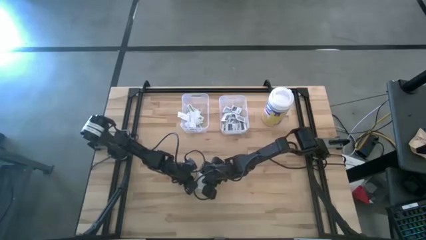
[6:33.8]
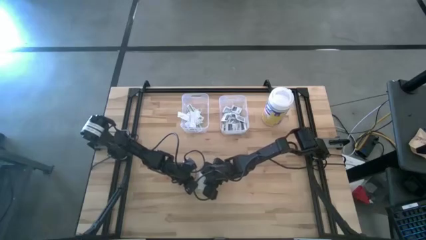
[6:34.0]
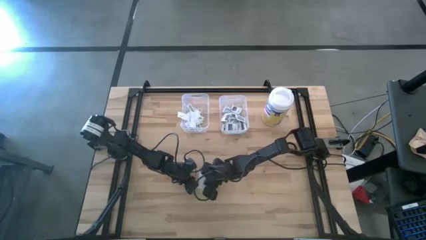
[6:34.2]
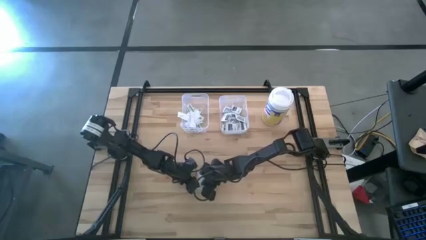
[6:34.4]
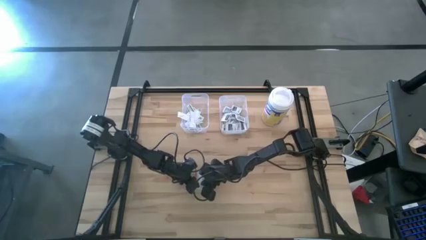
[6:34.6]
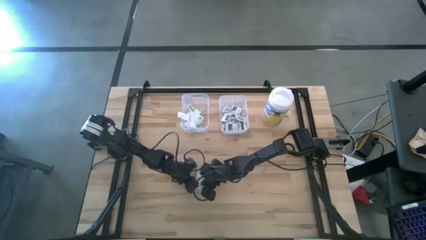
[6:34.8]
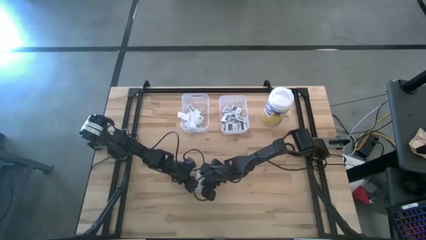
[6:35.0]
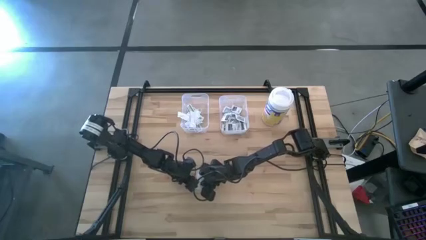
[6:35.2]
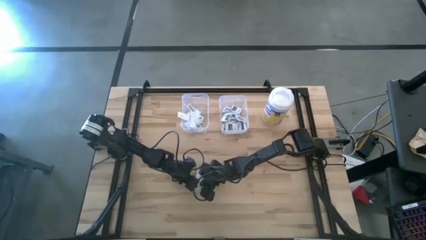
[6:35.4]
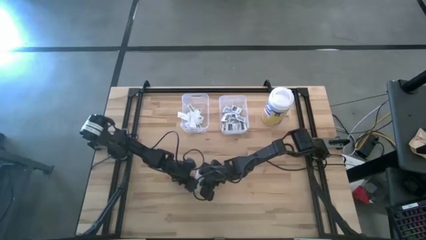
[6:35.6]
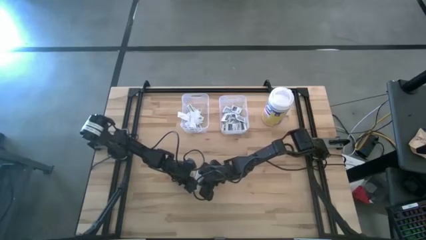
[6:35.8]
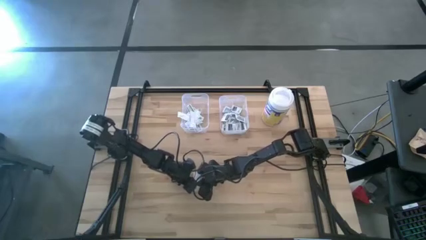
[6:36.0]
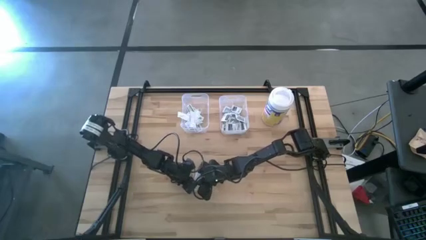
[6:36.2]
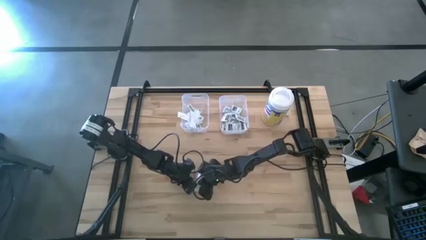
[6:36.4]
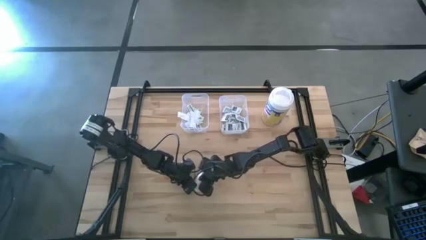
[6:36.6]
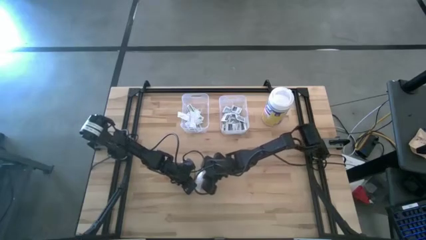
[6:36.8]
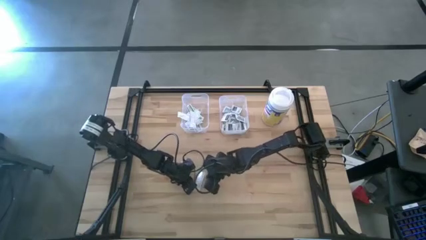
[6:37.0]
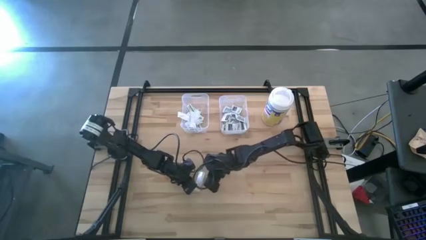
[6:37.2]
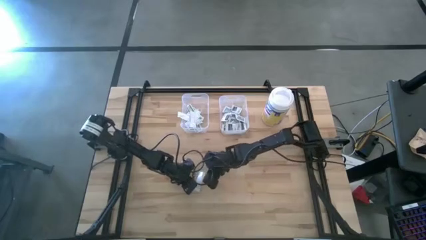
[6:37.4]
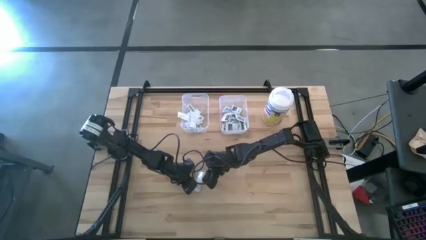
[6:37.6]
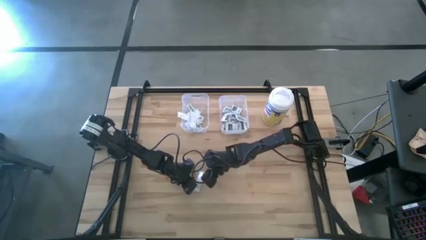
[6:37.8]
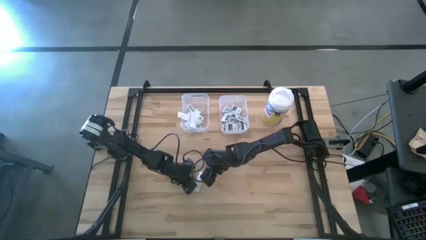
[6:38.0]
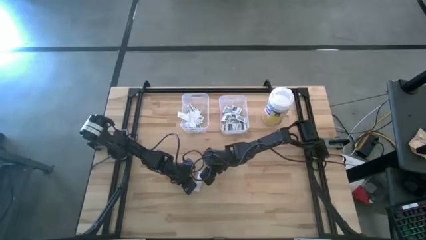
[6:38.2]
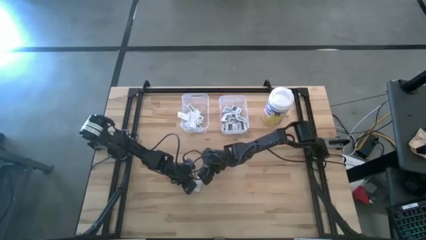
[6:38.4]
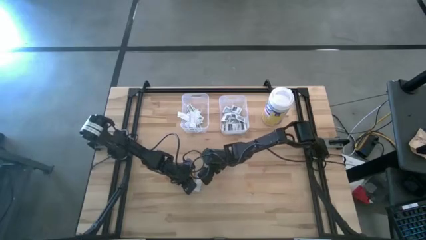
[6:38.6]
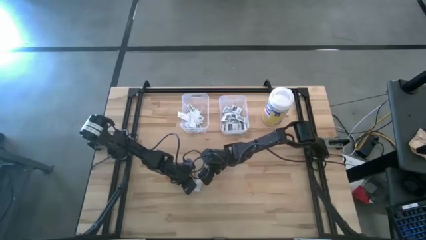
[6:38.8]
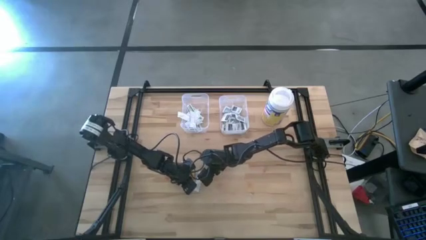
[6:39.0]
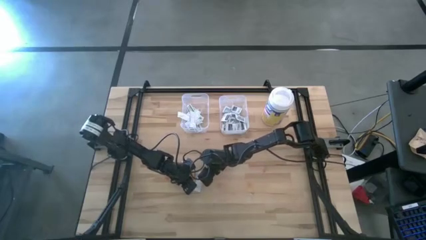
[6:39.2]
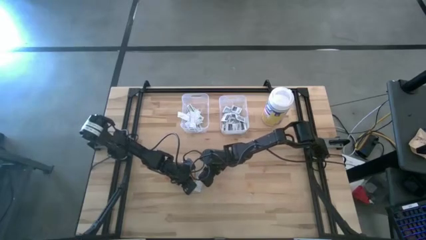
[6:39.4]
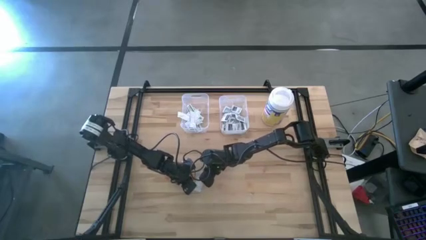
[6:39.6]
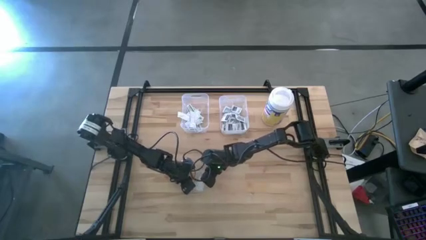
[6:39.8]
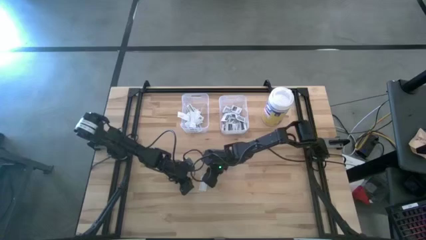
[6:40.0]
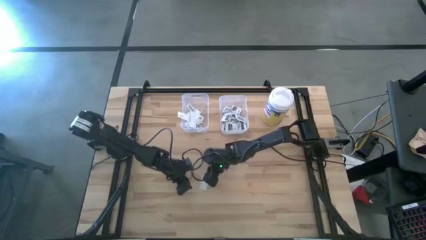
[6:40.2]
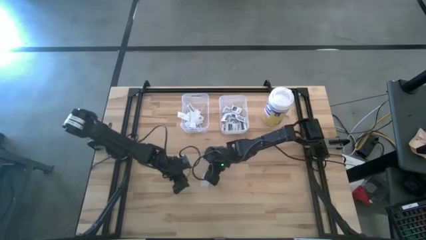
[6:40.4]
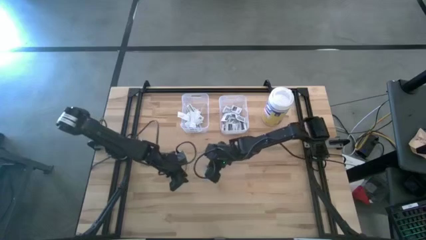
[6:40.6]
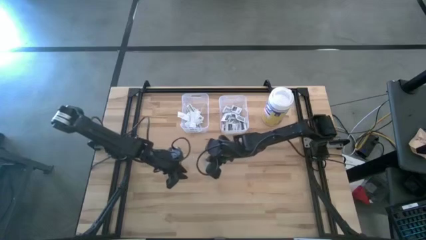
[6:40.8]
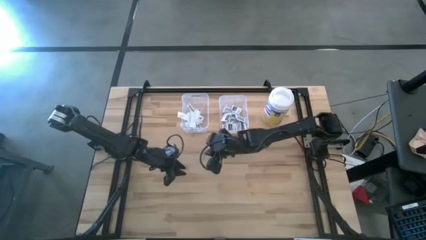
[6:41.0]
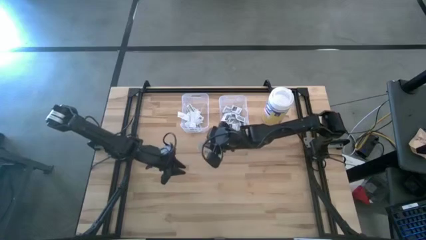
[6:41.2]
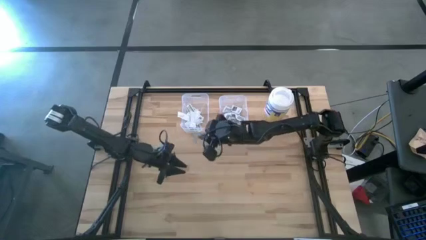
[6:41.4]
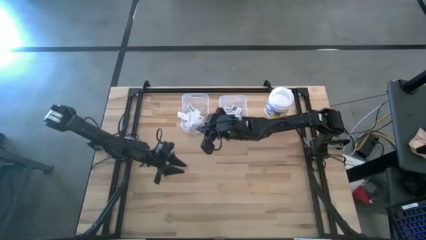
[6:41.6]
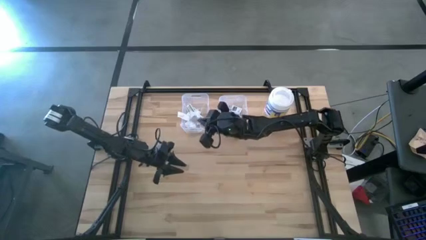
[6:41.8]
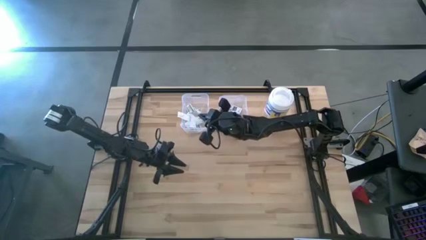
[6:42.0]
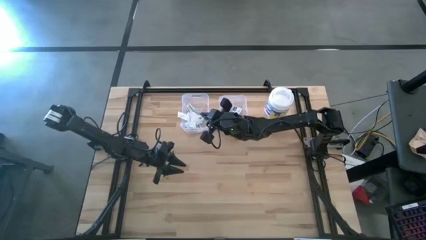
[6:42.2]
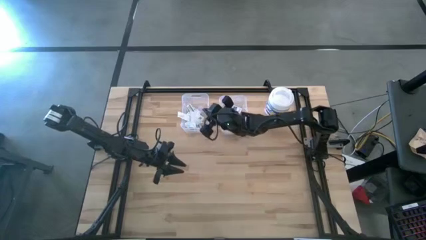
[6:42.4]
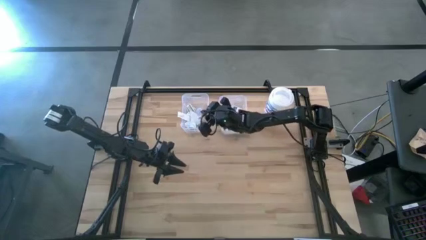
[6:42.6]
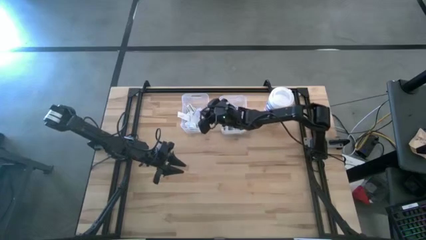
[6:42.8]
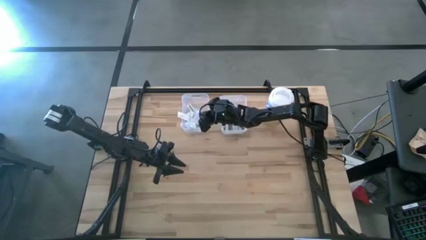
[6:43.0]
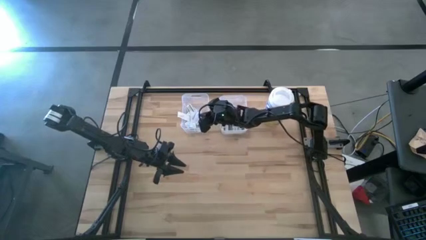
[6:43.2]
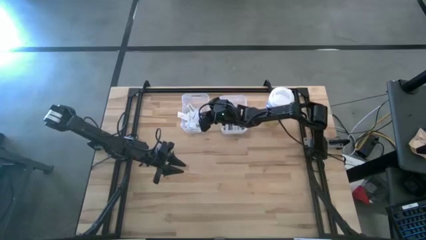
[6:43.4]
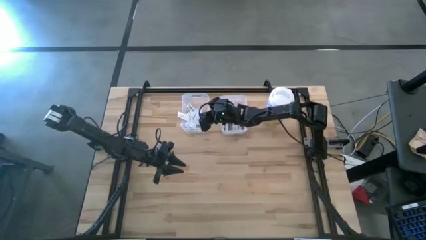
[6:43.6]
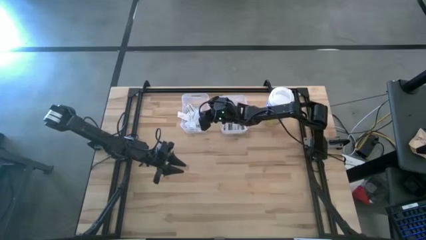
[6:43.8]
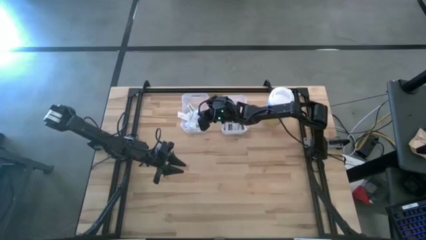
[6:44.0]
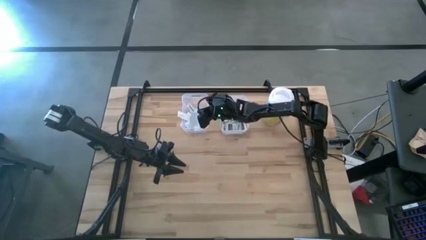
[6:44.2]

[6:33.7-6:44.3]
Task: Pick & Place First Aid Supplies
Put the green bandage pack into the left transparent bin

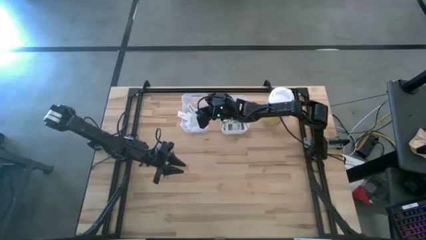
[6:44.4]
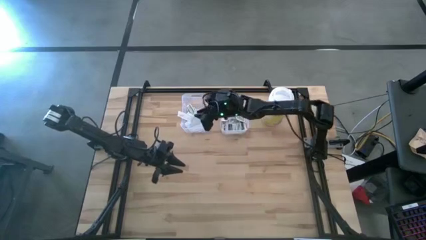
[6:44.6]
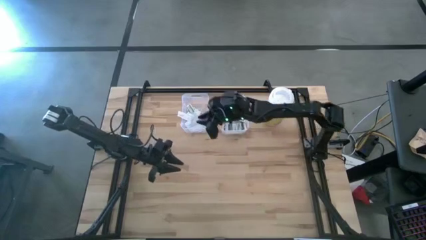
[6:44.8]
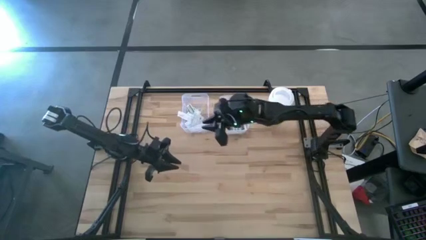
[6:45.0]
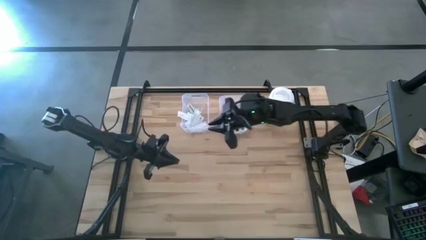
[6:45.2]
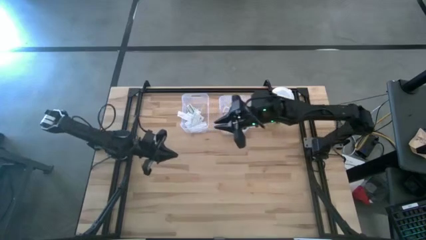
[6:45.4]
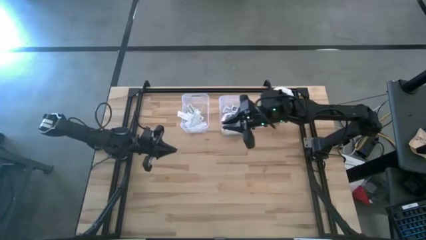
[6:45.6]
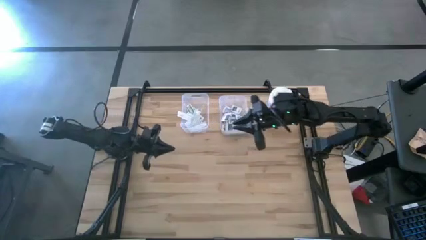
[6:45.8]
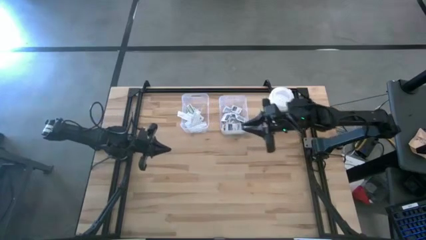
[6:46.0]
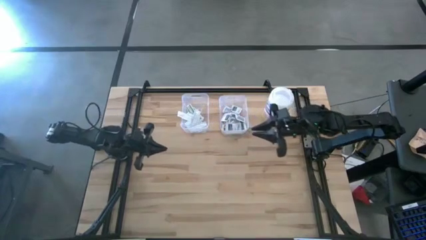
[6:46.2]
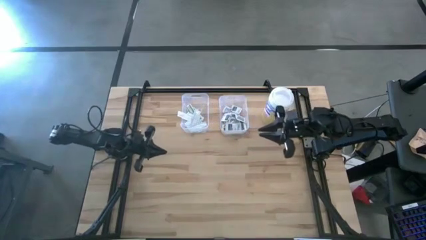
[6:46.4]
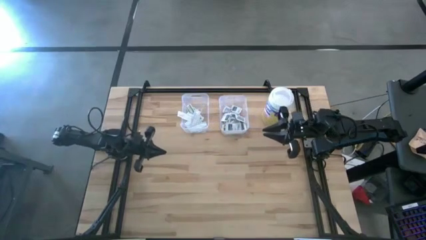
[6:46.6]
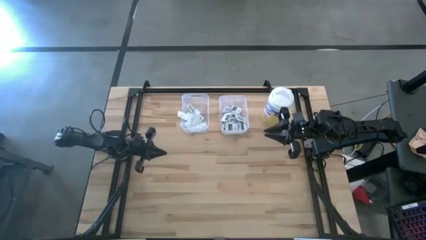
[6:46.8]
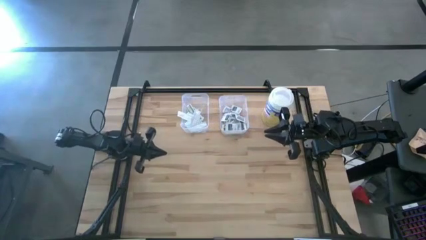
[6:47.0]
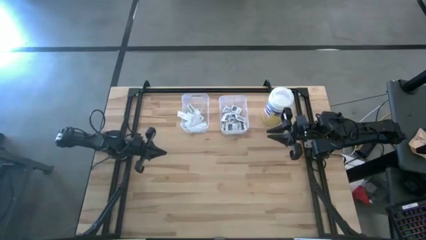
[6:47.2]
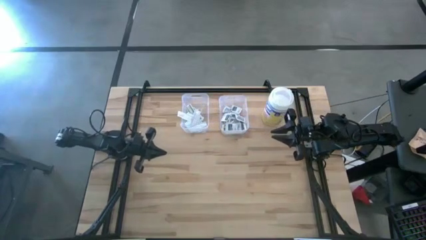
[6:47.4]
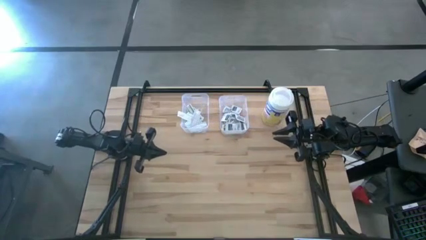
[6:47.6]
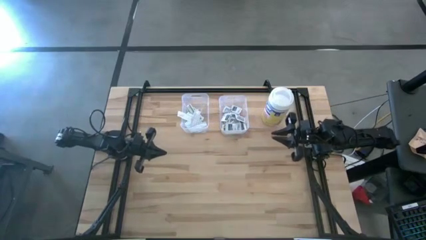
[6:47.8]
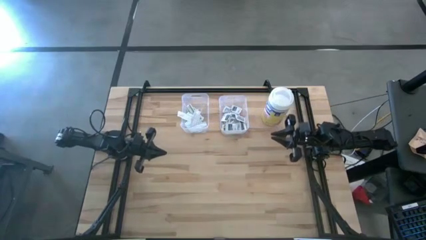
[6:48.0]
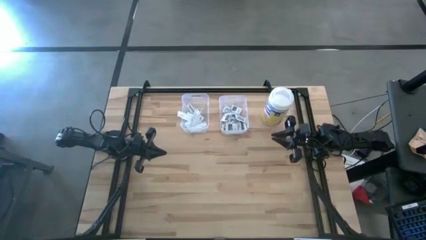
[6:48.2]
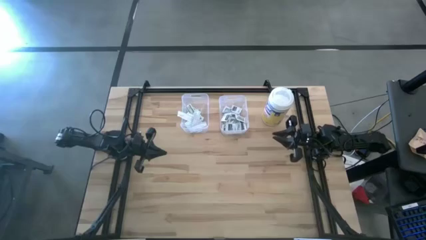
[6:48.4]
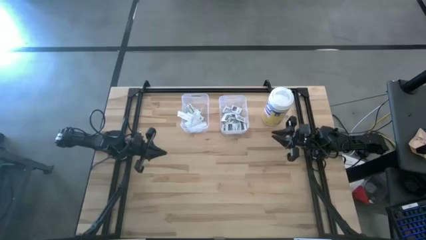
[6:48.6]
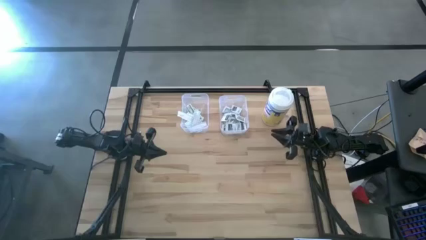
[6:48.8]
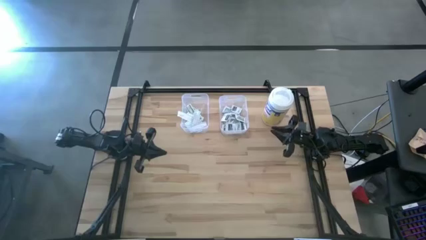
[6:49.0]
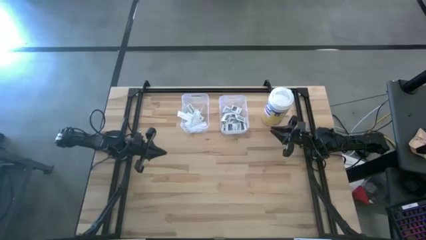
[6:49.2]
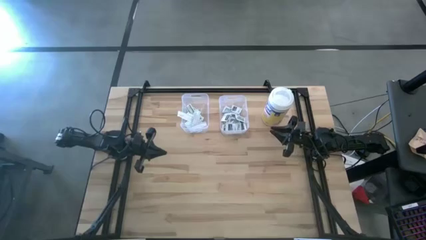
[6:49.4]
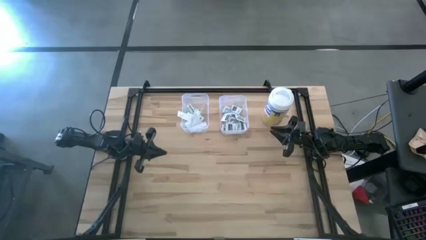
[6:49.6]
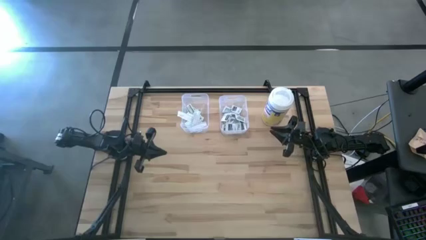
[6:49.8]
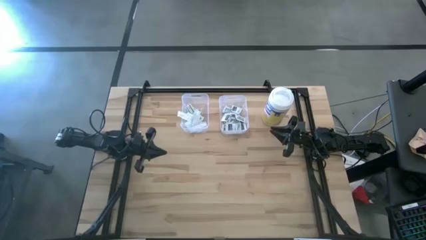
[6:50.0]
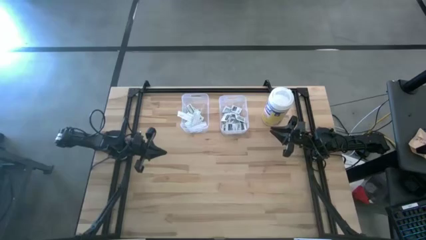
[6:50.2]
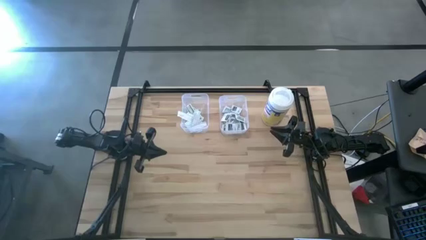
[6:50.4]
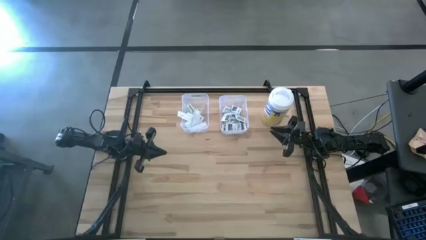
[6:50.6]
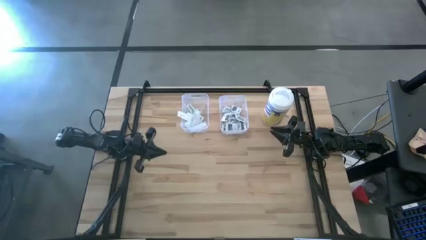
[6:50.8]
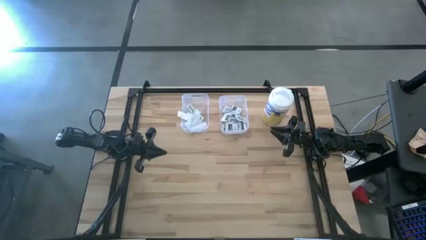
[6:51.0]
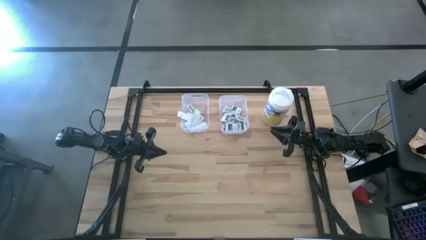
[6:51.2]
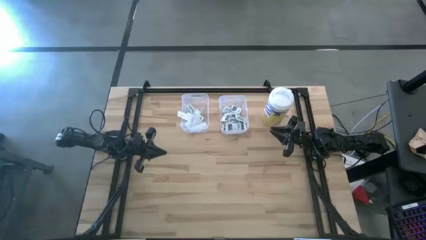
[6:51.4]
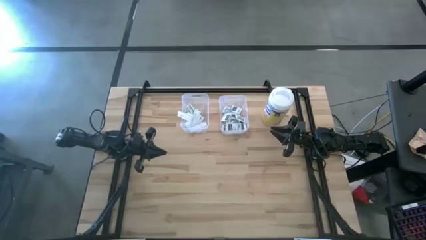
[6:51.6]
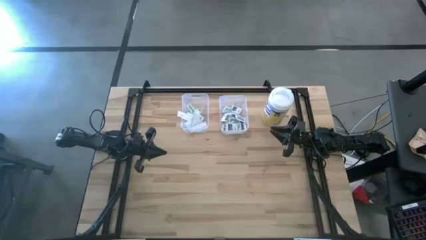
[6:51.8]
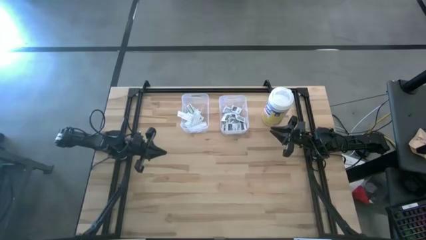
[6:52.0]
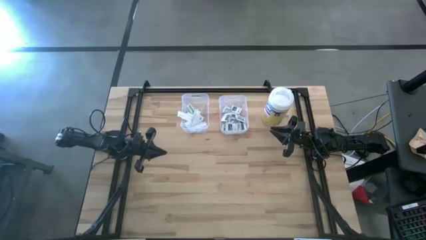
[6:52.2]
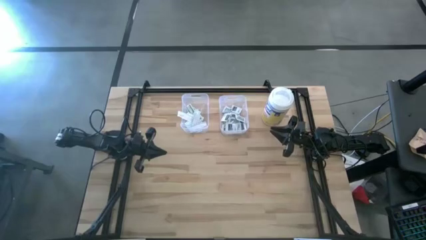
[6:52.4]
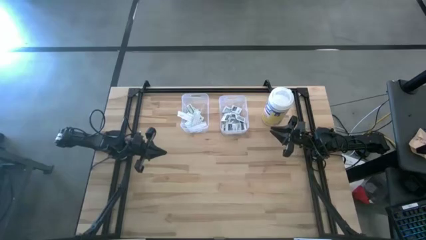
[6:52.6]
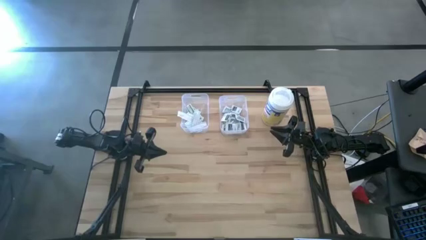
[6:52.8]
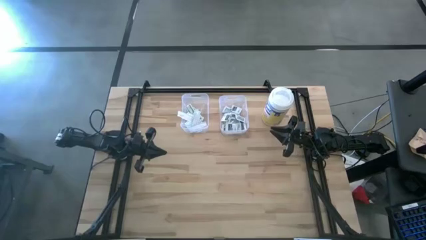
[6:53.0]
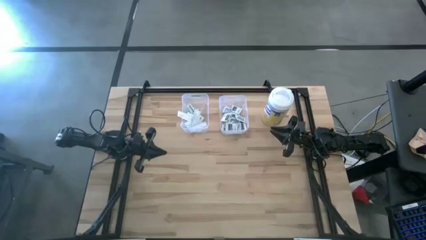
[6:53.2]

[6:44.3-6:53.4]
Return to Home Position
